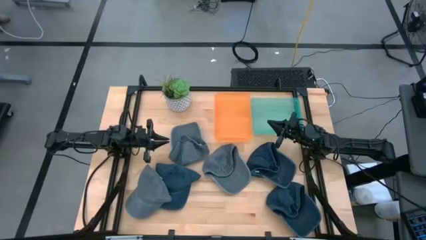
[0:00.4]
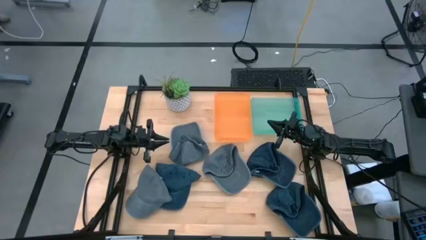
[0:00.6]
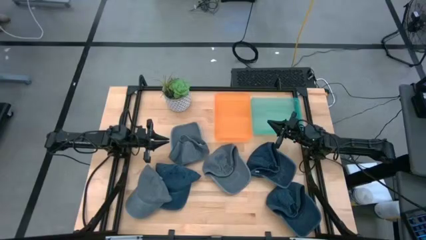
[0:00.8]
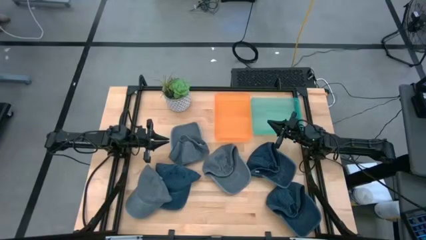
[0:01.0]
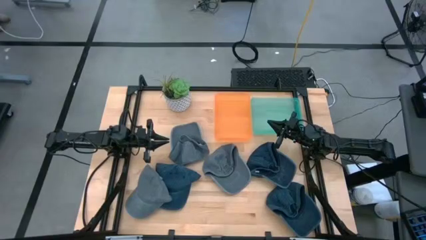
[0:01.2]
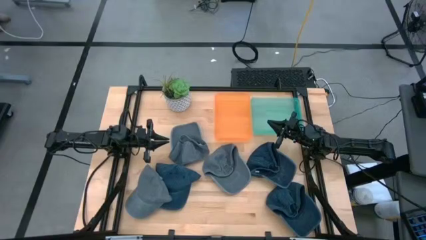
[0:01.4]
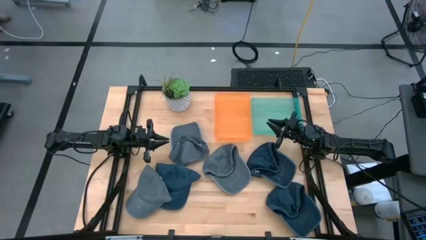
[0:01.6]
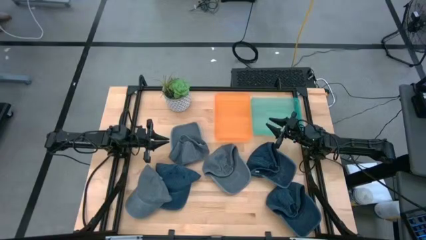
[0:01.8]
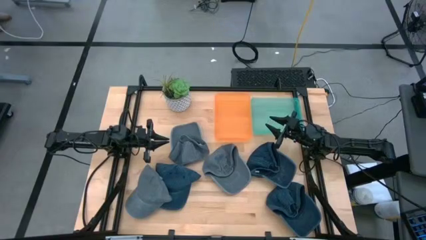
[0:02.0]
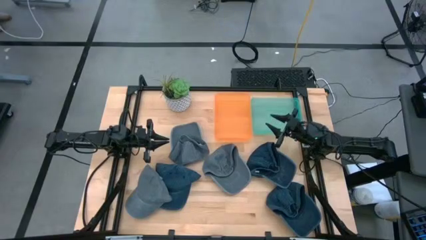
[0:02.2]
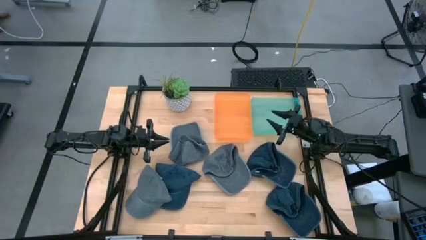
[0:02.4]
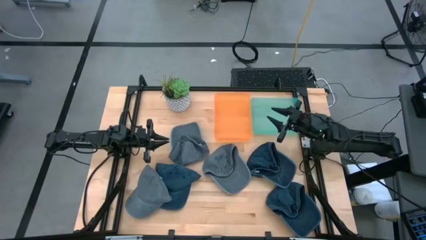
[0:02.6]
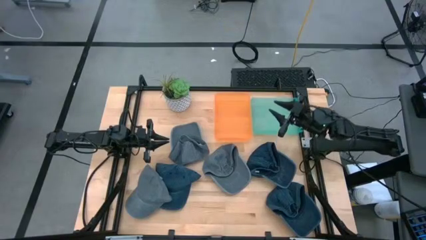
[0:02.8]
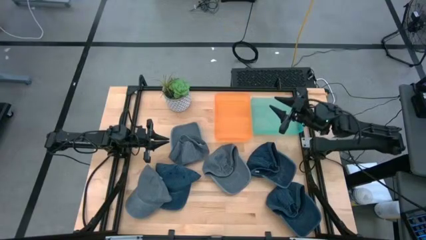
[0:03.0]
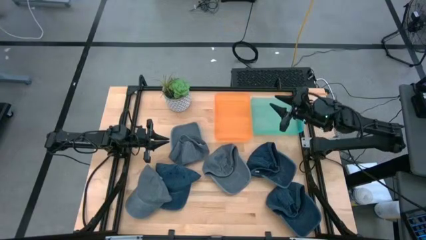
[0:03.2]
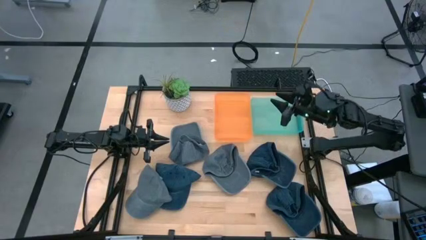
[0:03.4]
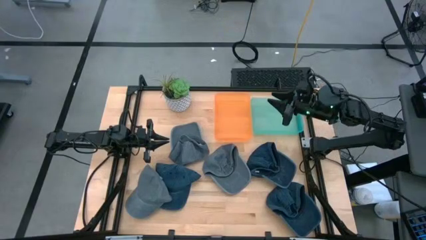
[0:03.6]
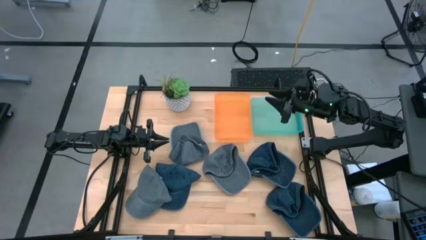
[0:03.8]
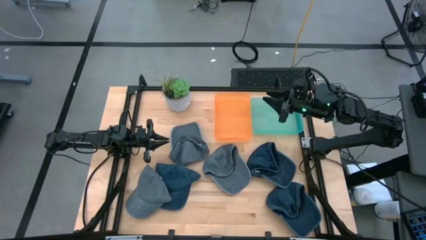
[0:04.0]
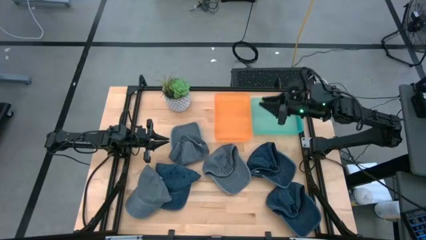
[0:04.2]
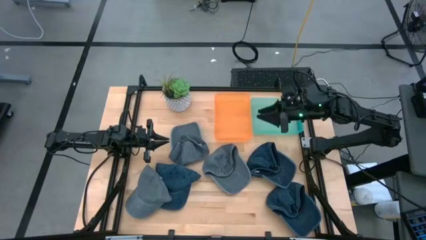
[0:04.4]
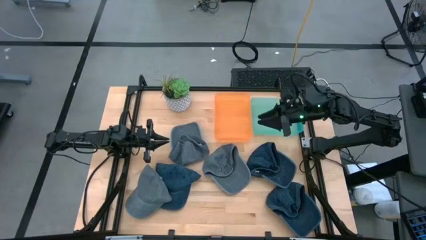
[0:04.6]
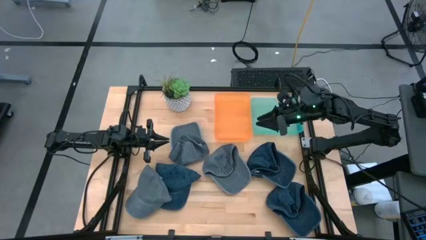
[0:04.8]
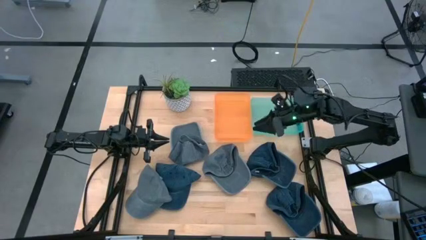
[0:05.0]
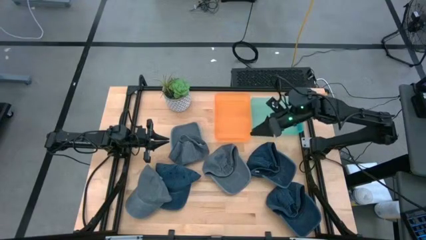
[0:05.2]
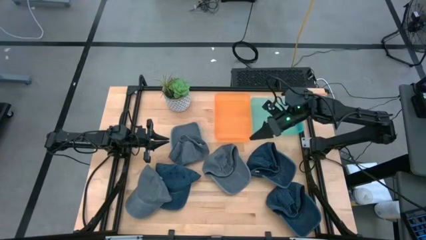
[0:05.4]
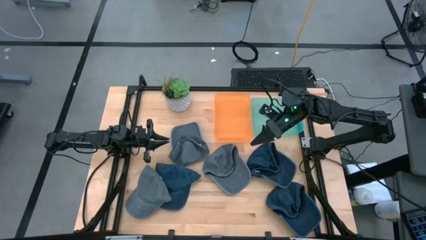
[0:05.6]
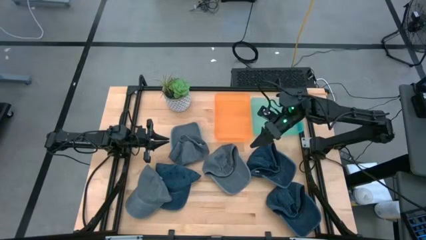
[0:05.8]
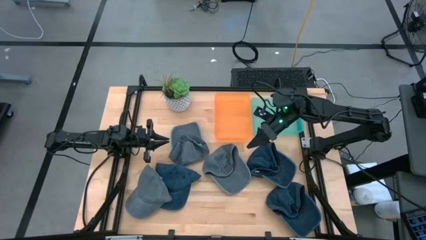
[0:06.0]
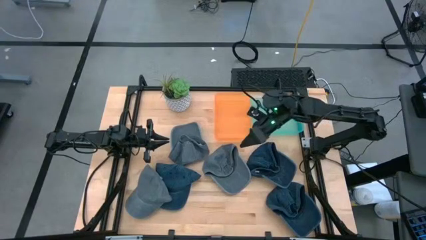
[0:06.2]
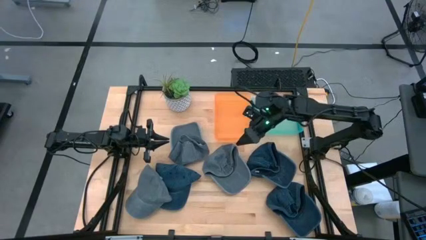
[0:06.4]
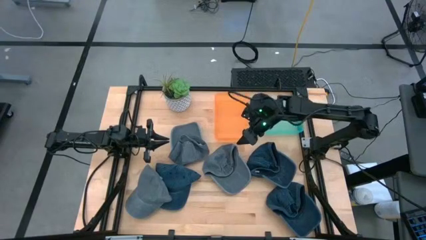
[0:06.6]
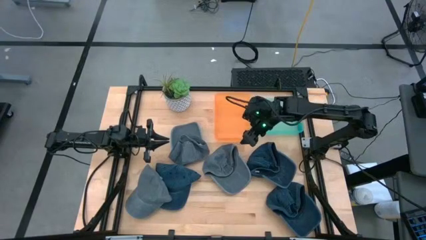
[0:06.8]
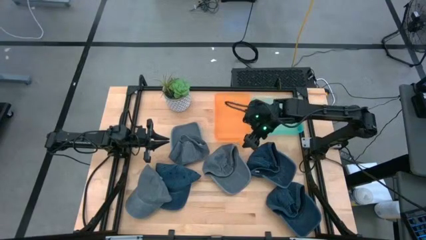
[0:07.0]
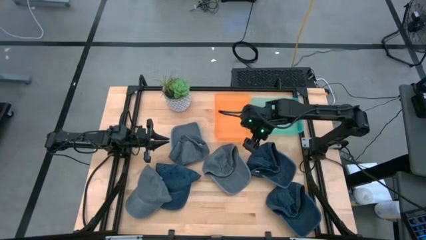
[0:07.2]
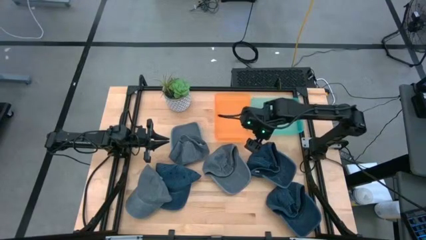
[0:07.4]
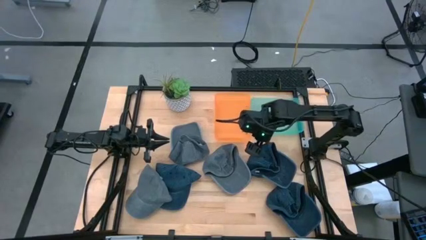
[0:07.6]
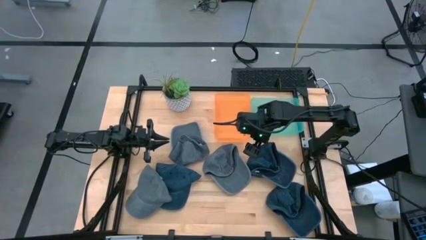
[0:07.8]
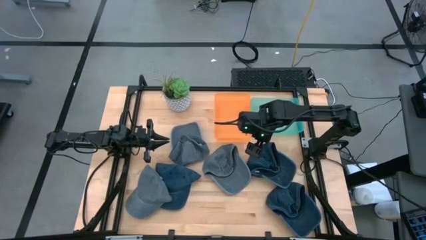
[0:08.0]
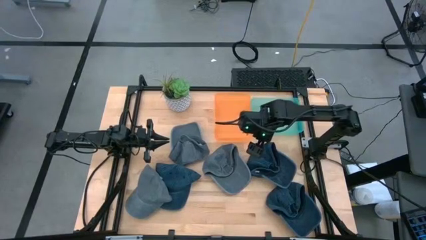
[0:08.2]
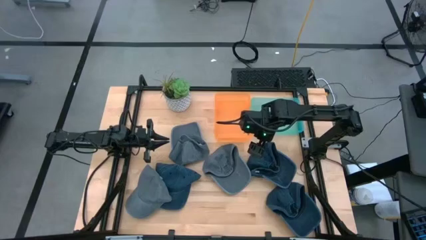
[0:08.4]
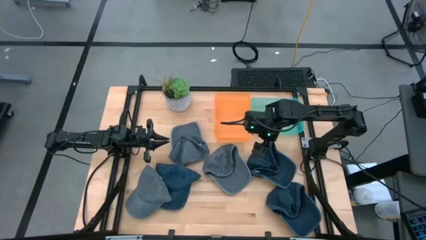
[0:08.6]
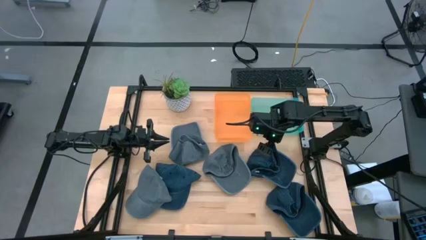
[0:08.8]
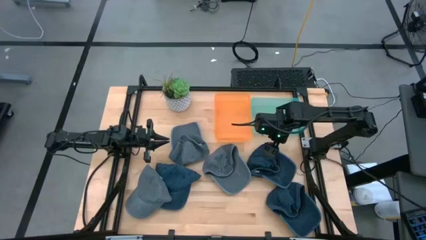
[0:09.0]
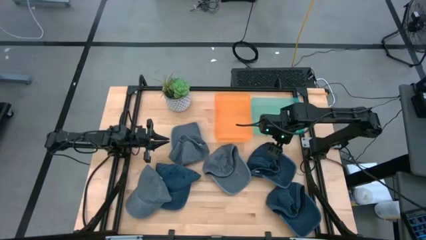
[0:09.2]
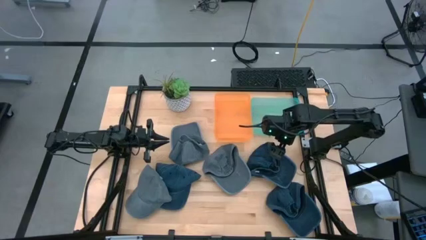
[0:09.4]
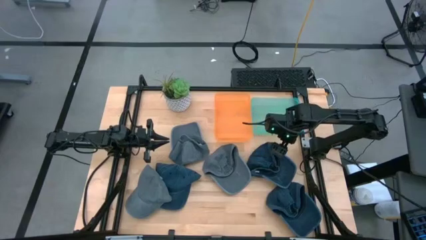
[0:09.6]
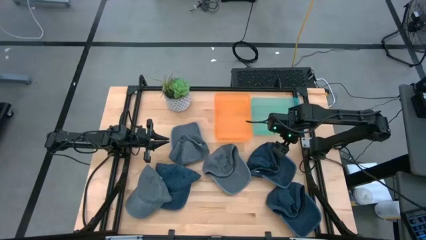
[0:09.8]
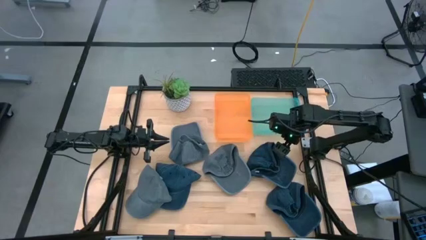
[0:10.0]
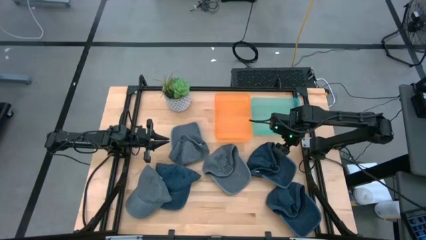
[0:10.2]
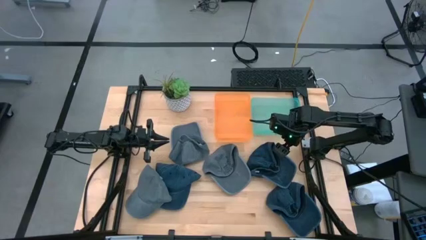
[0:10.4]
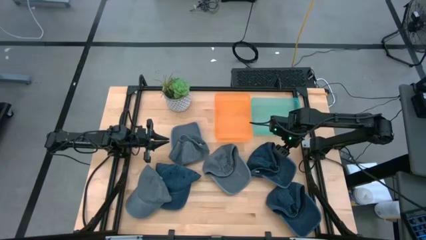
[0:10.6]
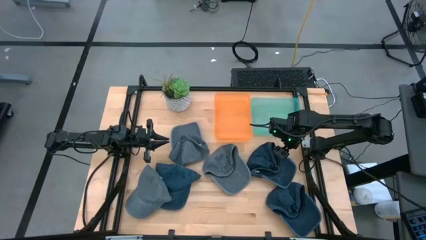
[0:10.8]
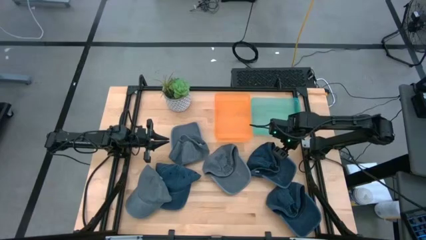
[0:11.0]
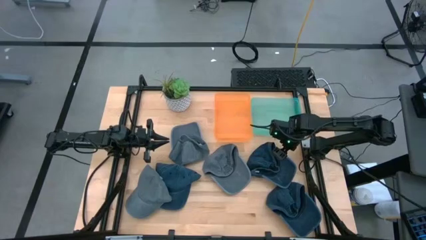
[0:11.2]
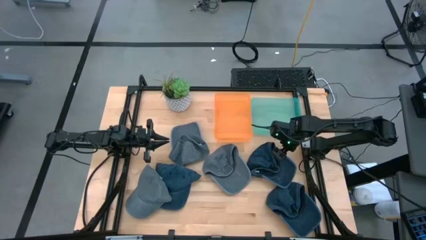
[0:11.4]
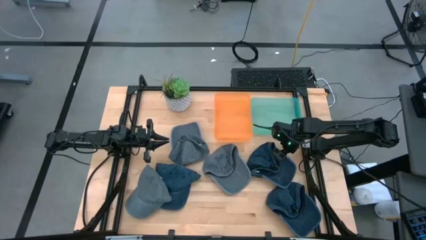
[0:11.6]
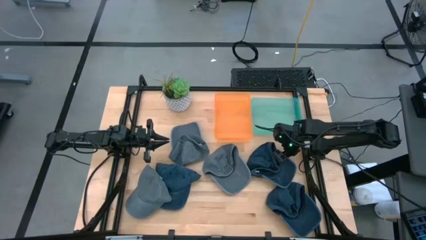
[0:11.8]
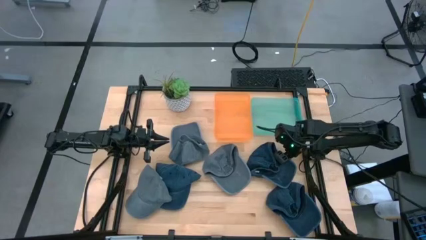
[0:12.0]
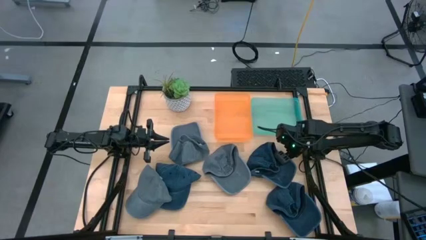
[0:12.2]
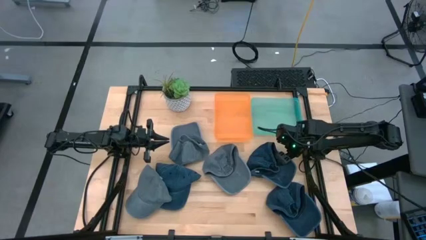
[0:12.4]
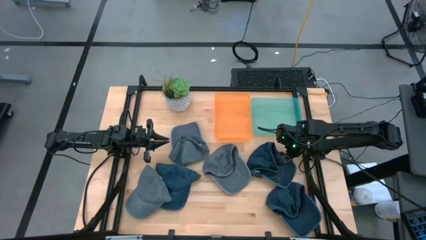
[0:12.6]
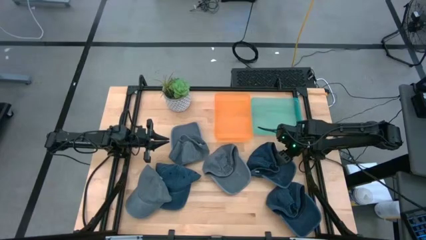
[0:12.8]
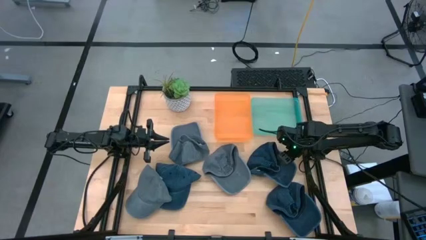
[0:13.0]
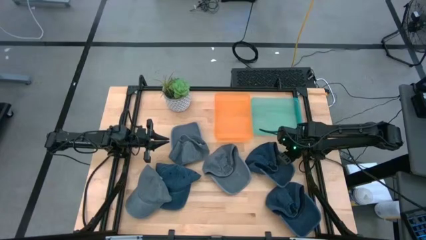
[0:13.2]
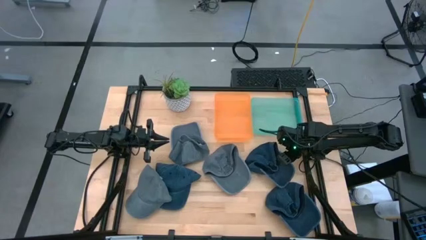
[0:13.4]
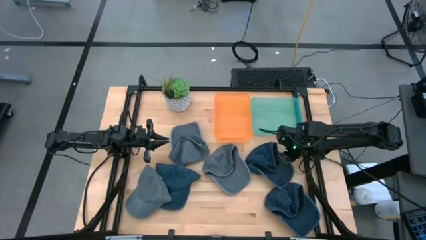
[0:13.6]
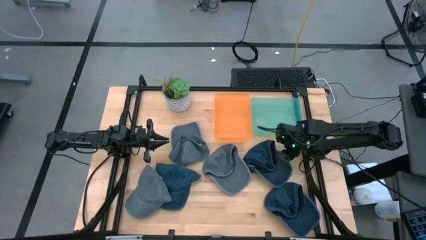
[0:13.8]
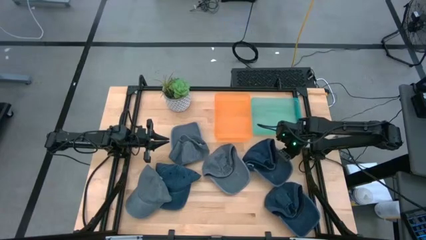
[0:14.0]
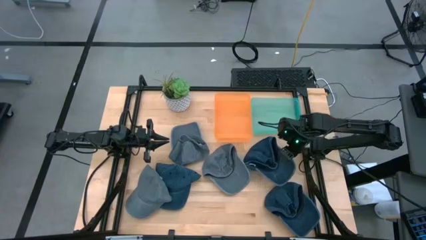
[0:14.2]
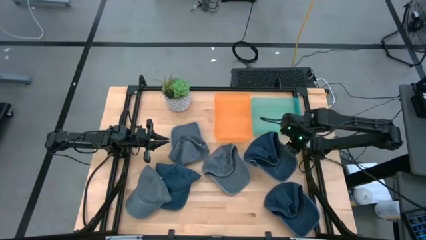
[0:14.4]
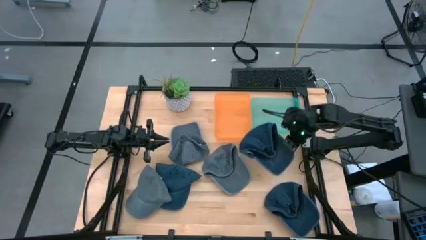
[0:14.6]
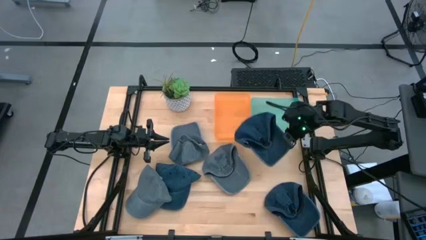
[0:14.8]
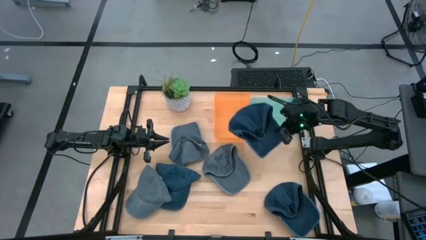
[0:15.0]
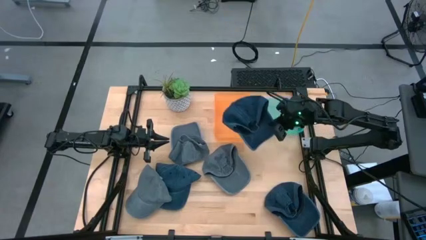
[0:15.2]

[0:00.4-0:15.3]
Task: Pick & Place hat
Put the top right blue cap in the blue bin
